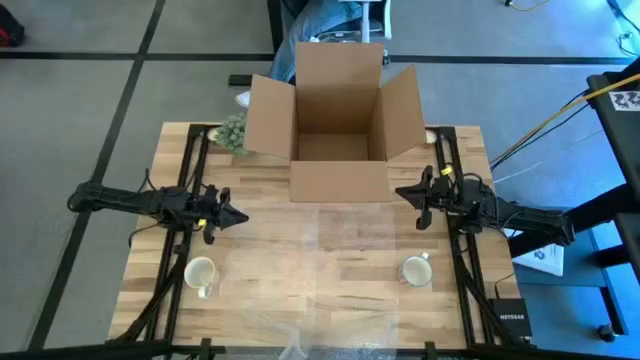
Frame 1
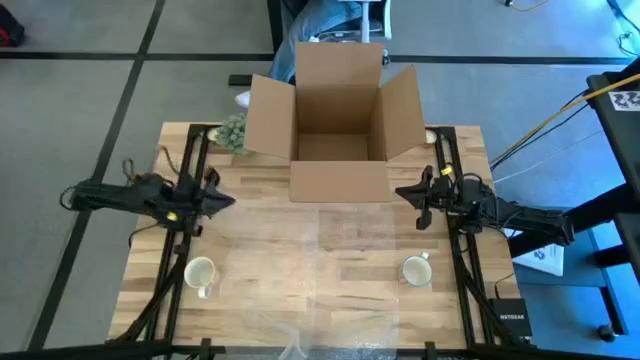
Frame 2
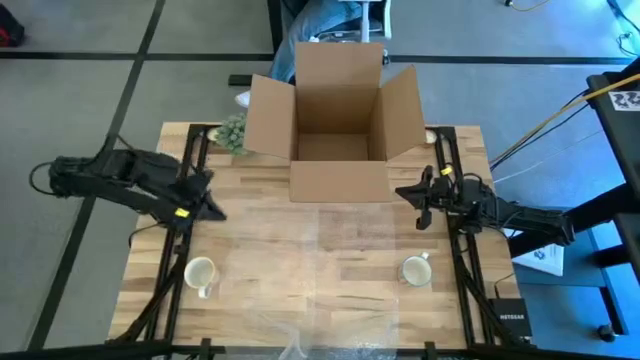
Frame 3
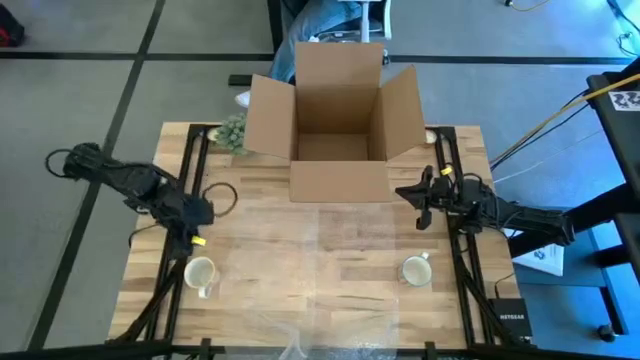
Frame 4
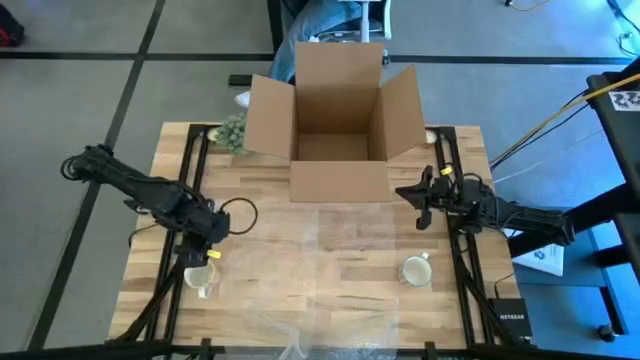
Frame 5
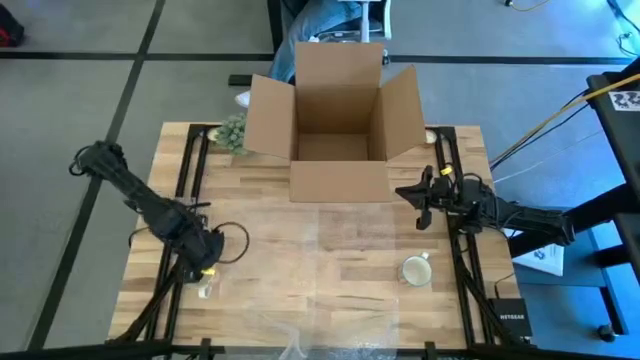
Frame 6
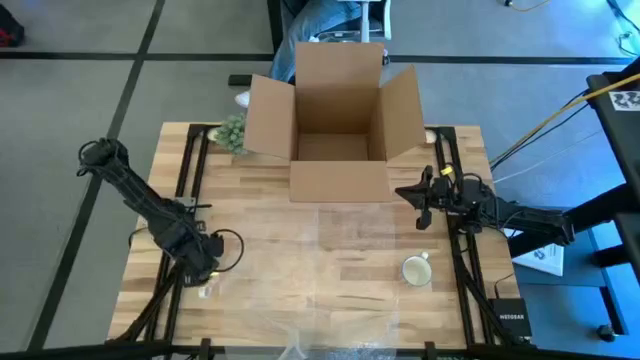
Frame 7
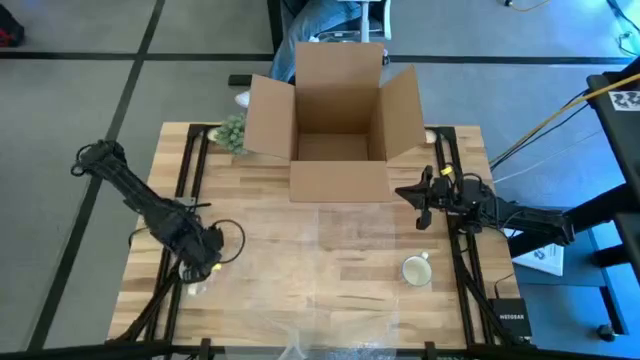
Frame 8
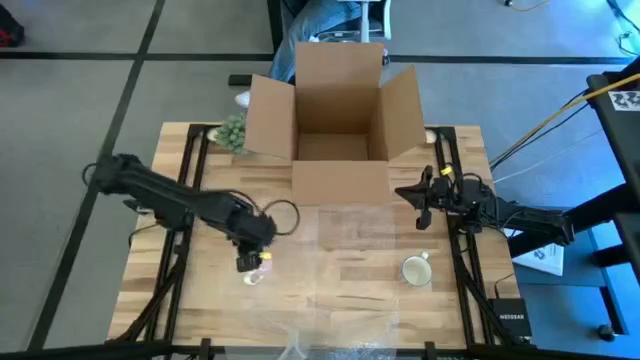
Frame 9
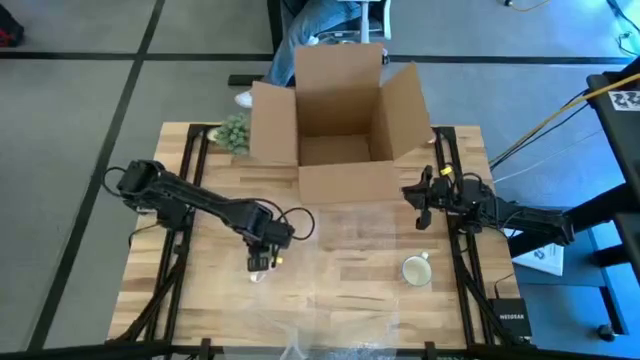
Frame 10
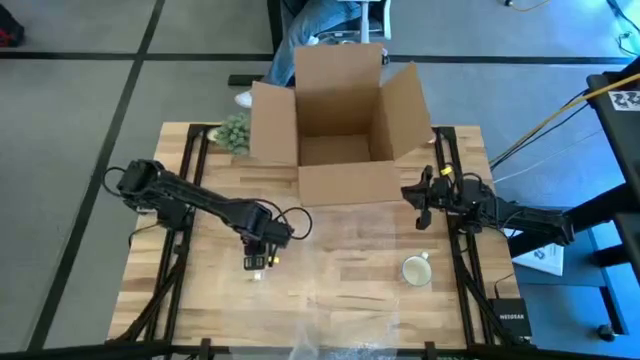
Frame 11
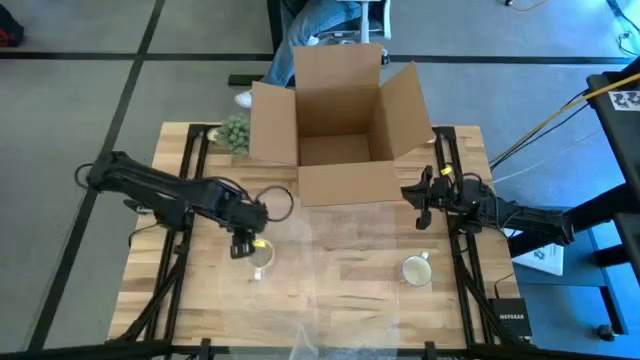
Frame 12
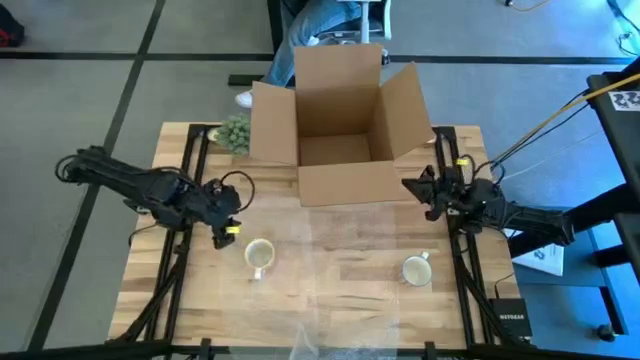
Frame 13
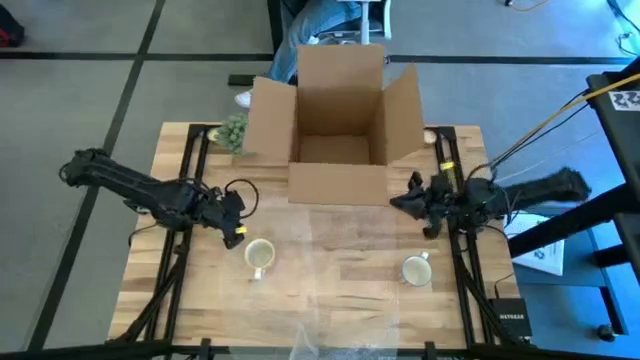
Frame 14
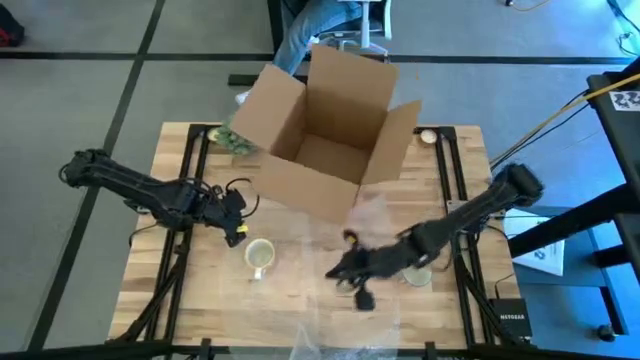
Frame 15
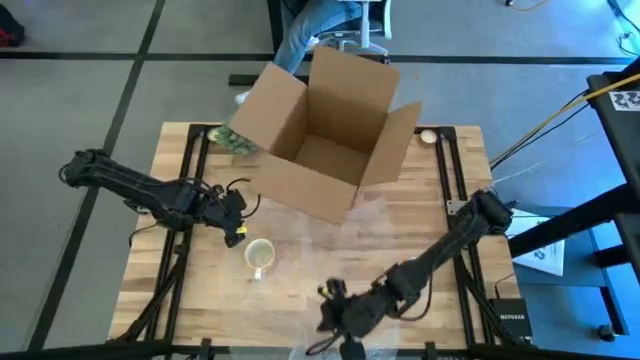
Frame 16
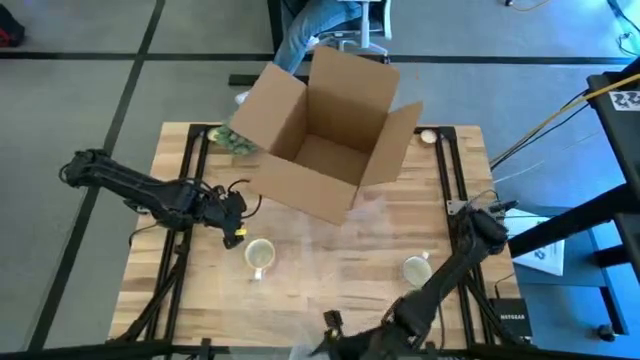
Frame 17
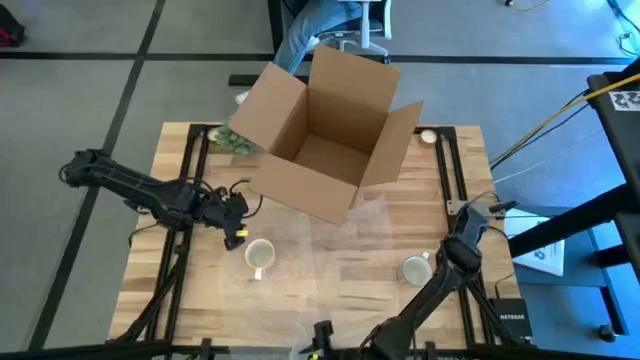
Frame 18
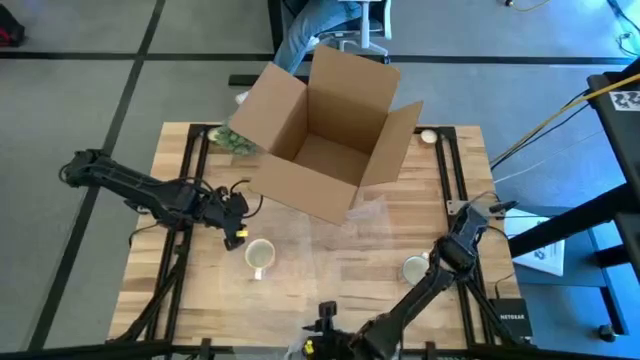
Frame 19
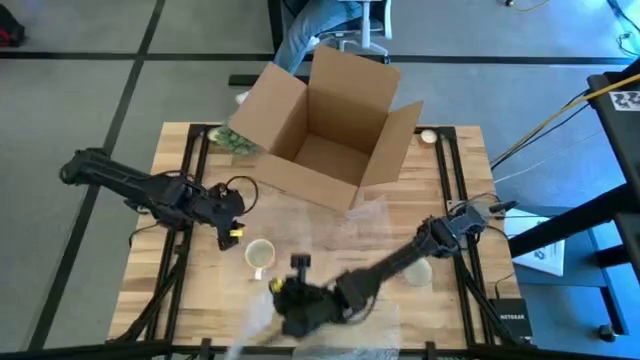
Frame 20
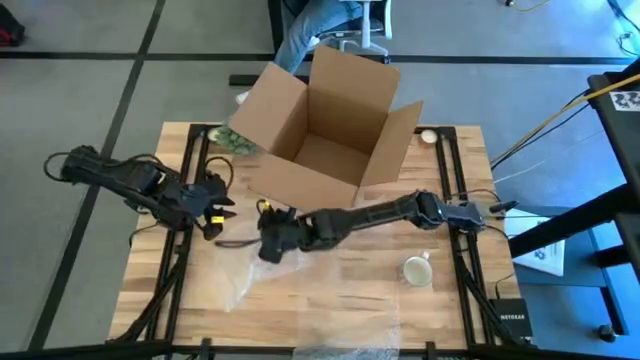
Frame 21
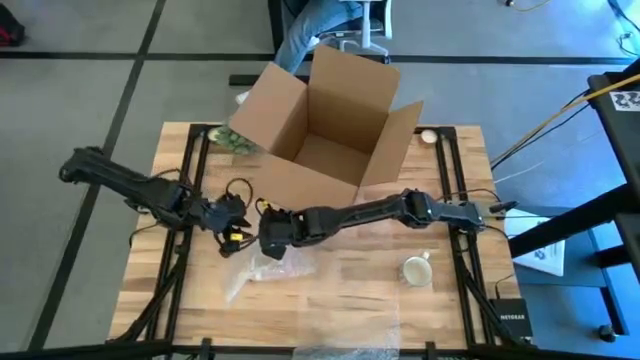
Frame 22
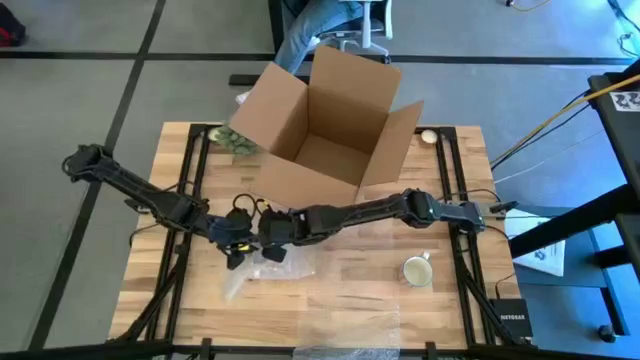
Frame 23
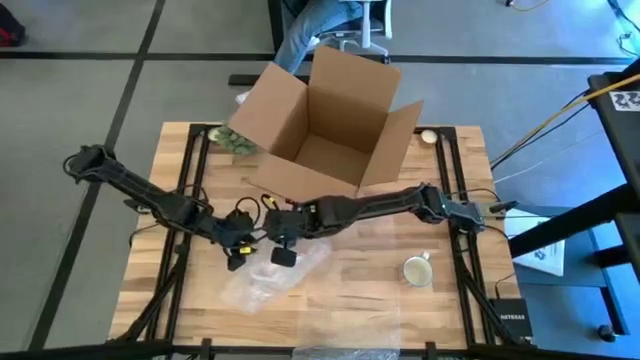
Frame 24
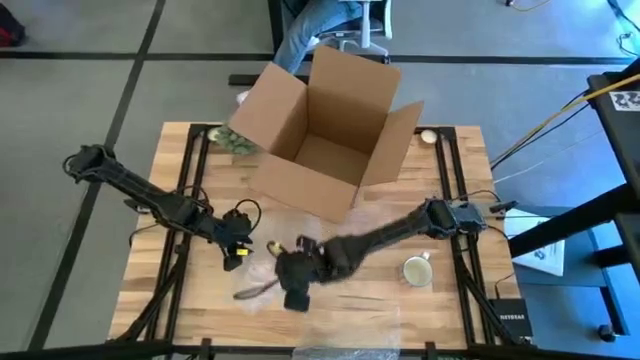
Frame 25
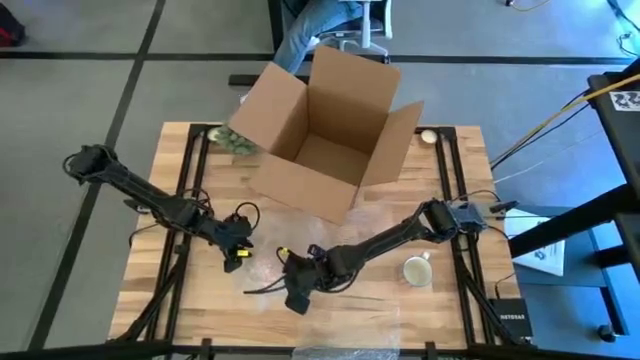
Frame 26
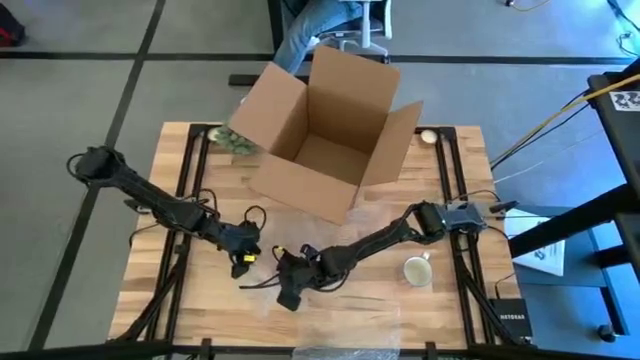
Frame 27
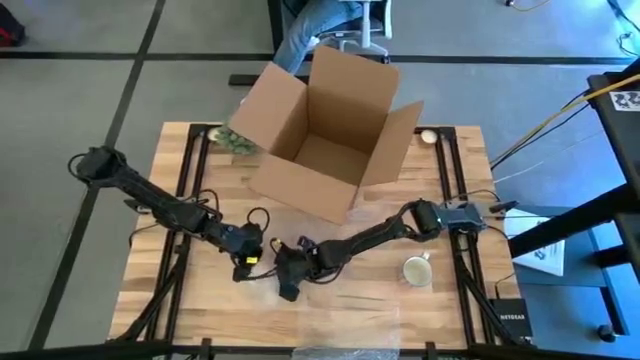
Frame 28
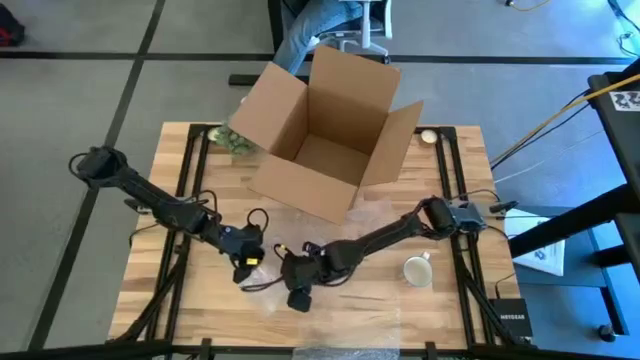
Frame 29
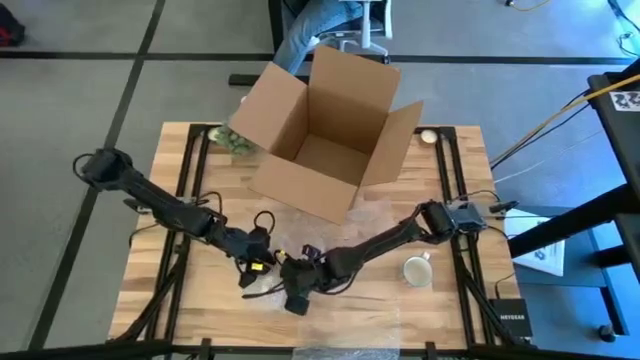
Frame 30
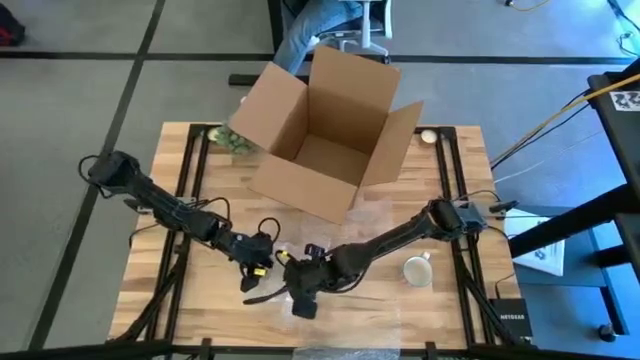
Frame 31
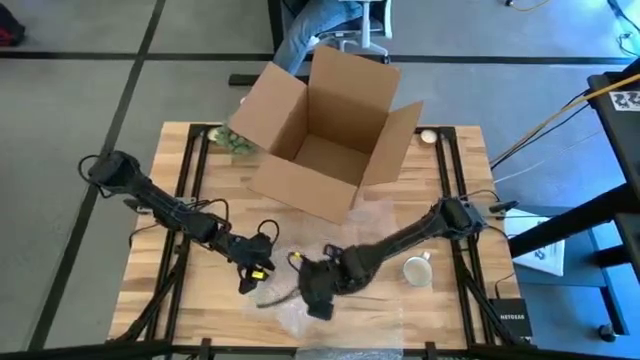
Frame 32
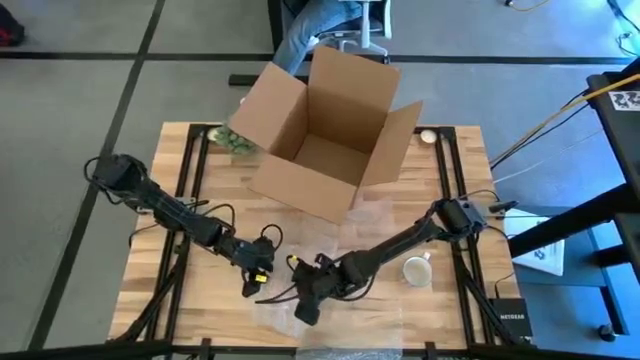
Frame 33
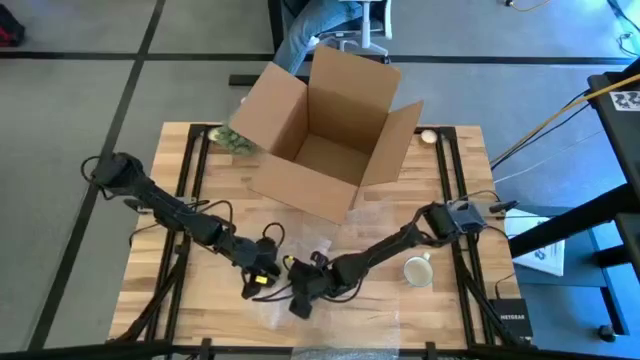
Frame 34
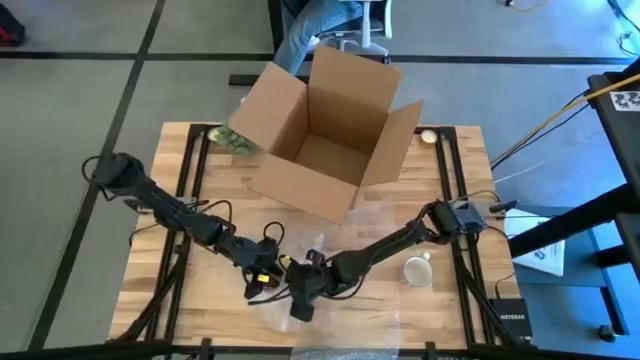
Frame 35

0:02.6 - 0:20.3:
Task: wrap mug
Wrap the orange mug with the left bubble wrap

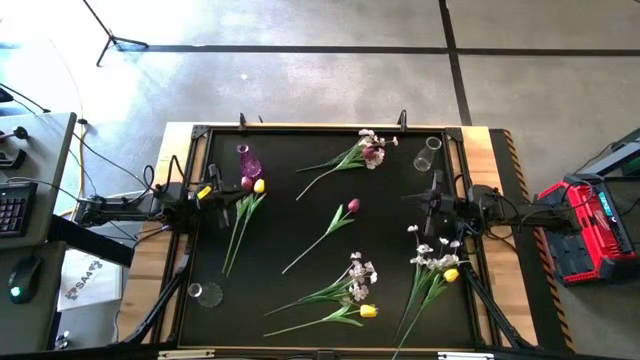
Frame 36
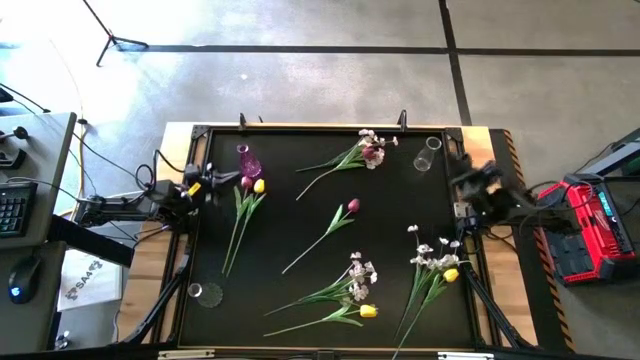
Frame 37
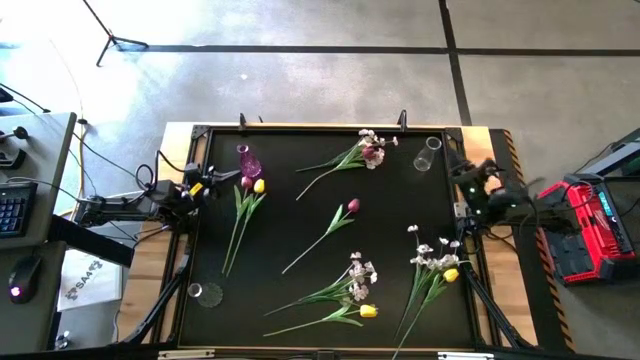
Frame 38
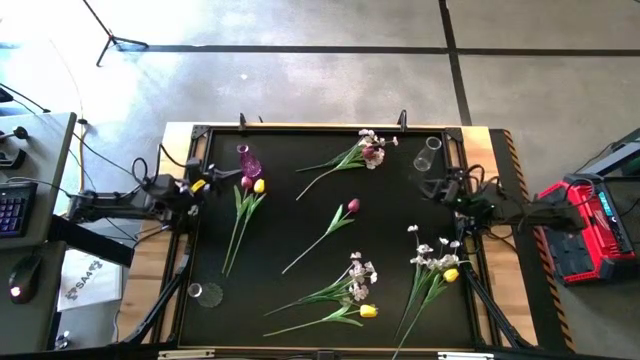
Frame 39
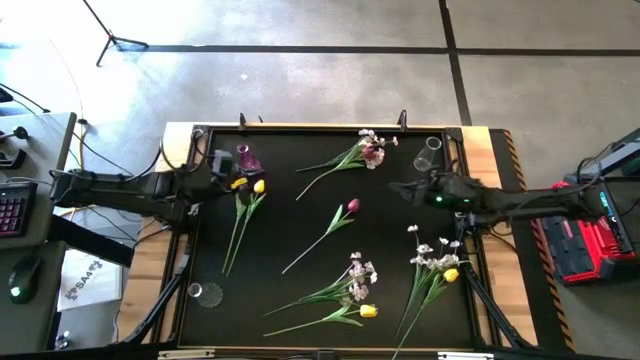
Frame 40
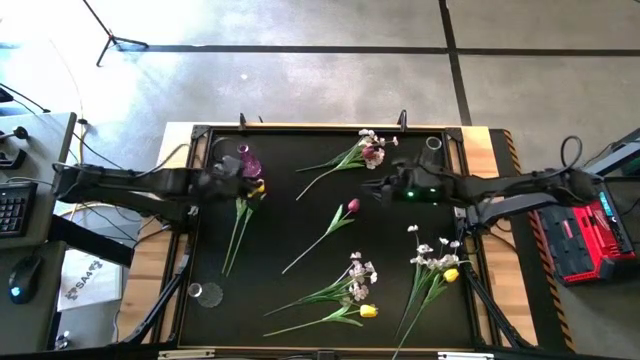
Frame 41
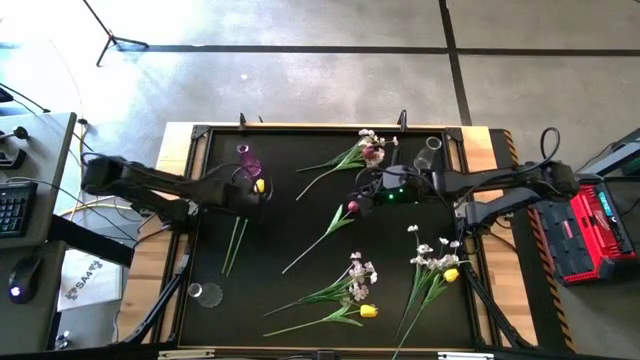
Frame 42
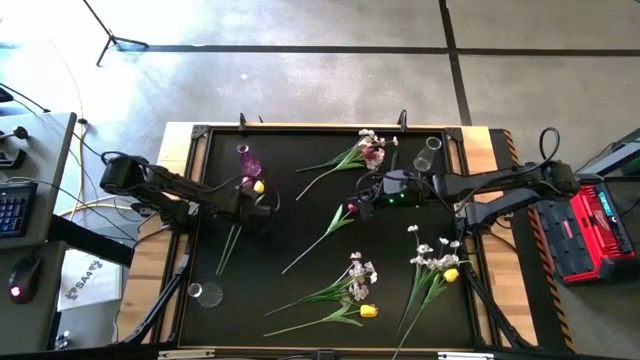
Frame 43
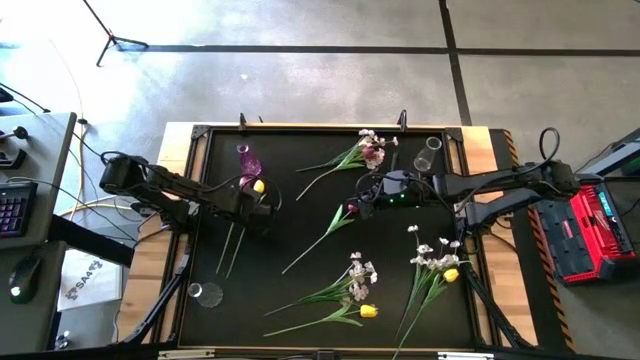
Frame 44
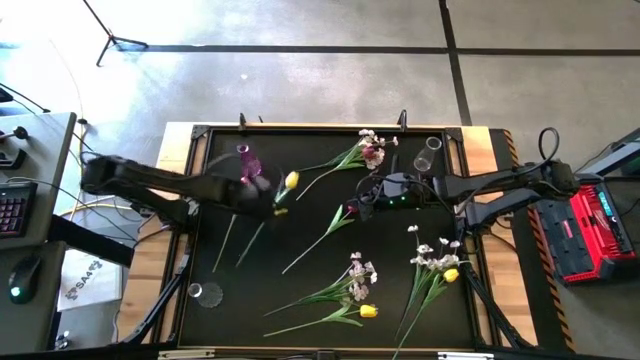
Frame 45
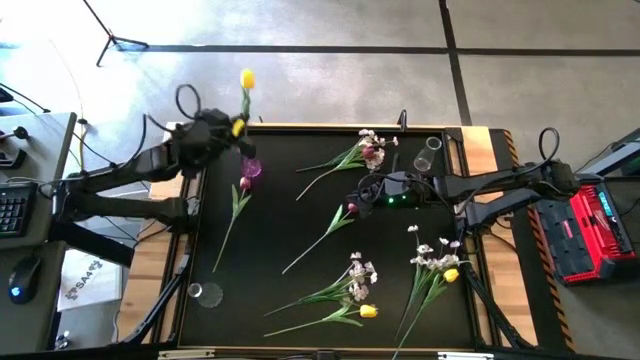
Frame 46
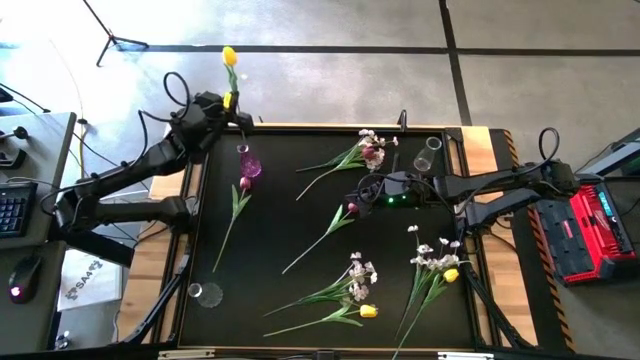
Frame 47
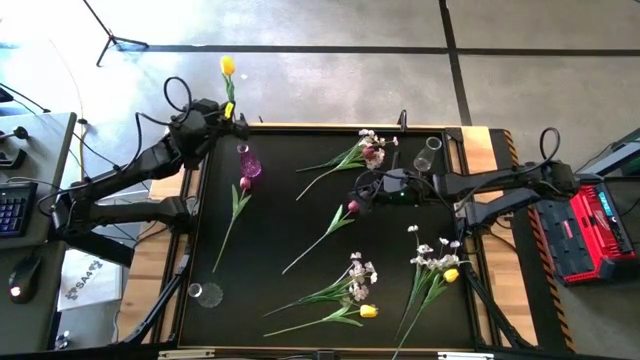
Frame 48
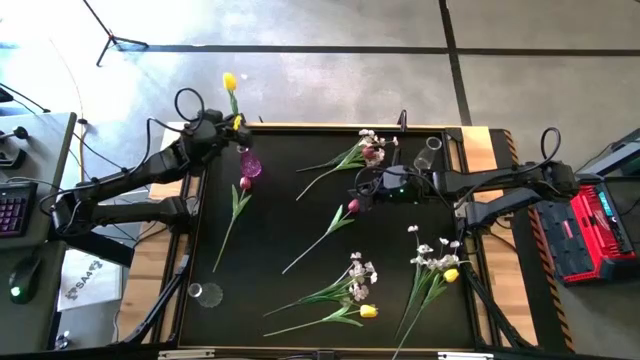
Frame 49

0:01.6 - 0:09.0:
Task: Sort flowers into vase by color
Put the top left yellow flower into the violet vase
